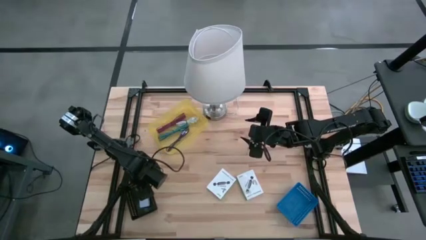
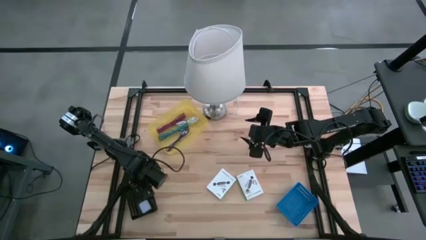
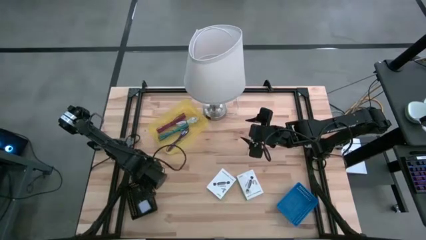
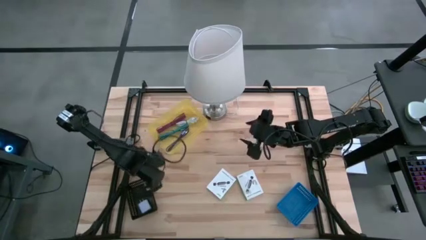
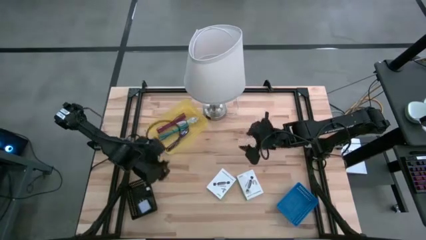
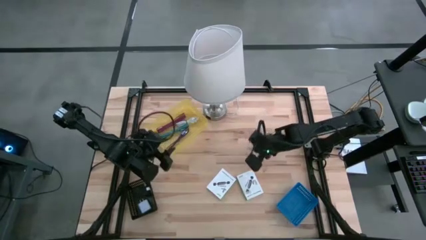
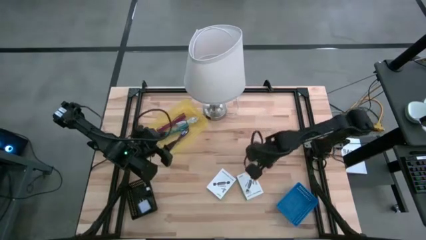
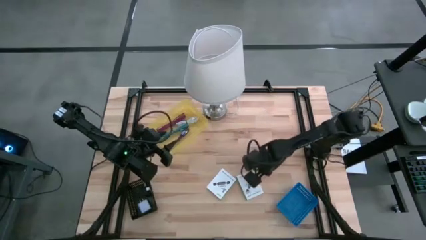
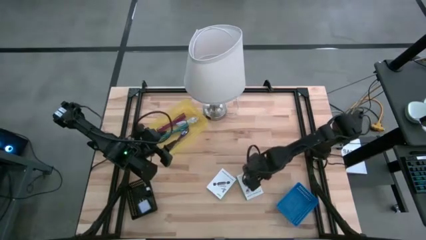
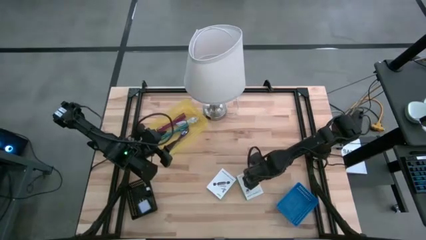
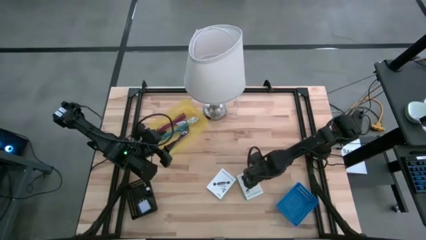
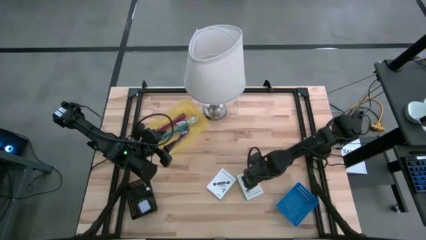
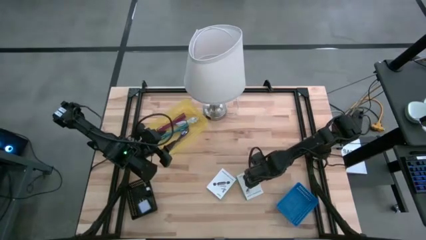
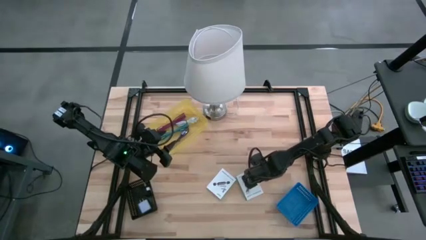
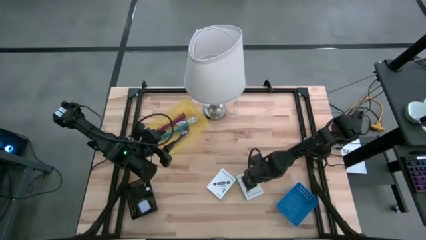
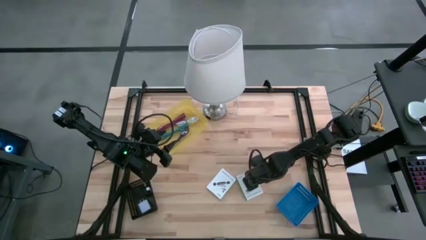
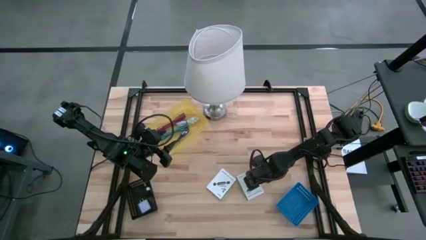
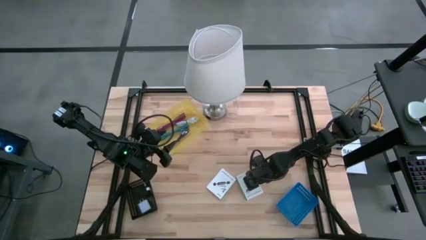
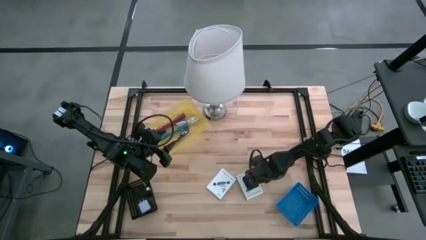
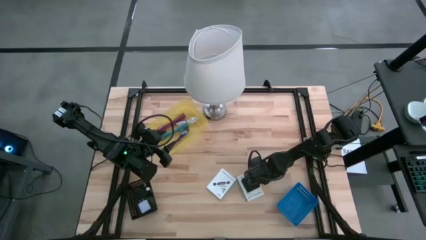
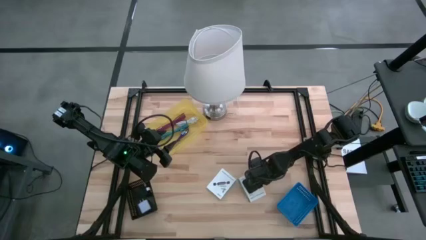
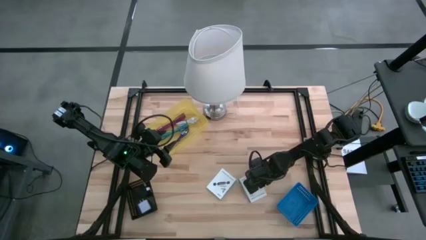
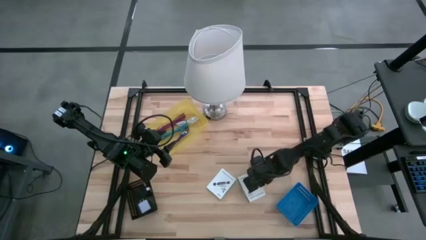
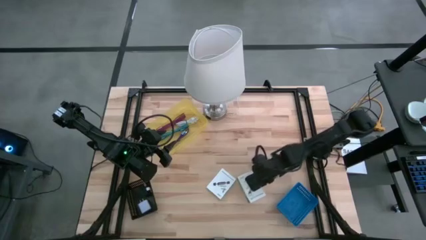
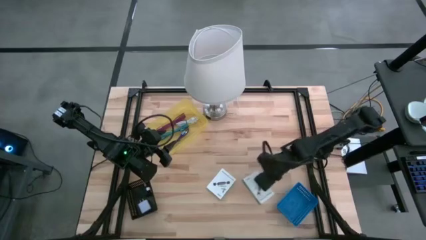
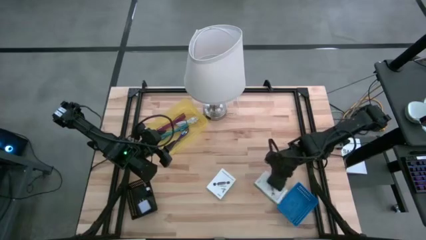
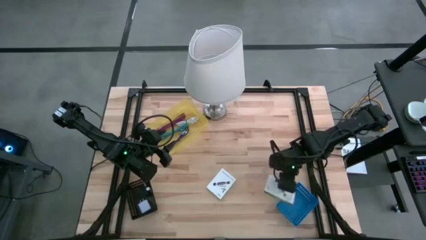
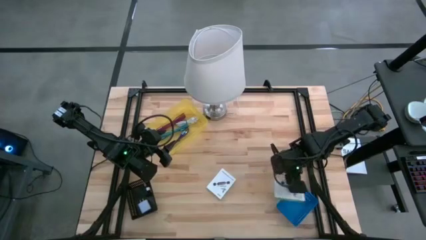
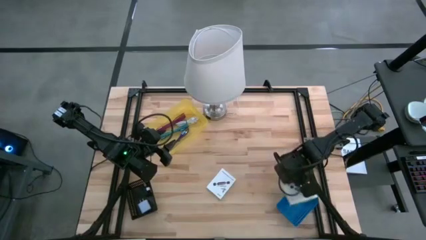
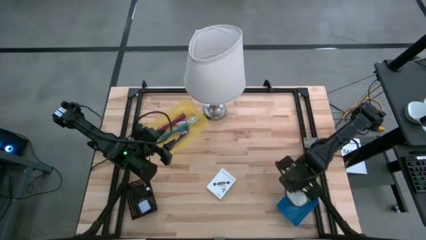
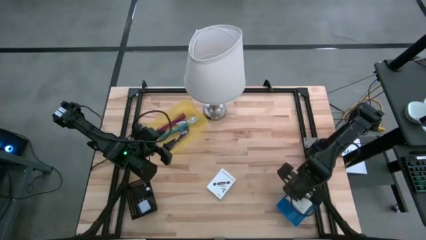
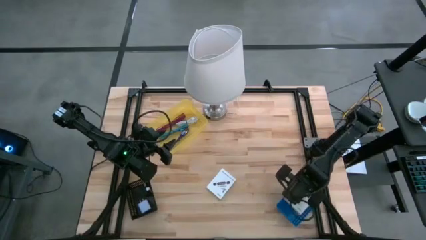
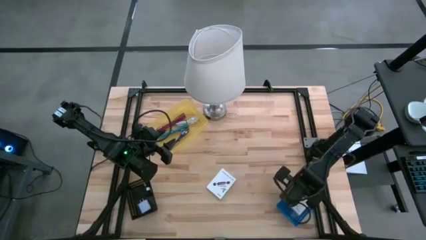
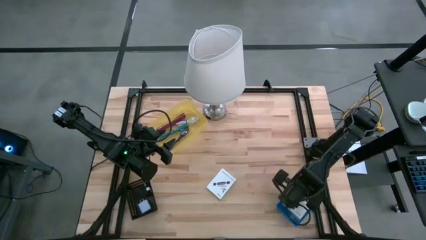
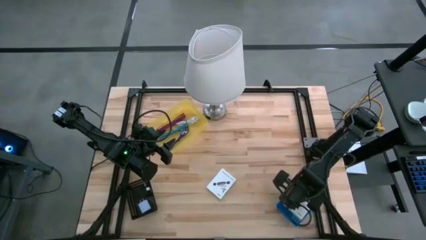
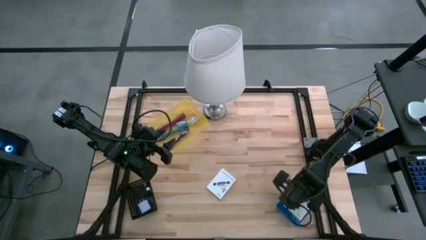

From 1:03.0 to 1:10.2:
Task: Pick and place items into bin
Put the white card reader box into the blue bin

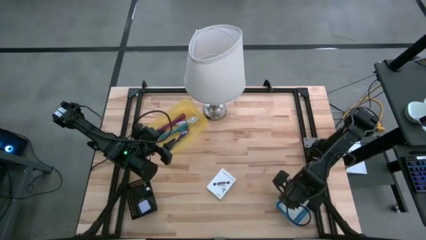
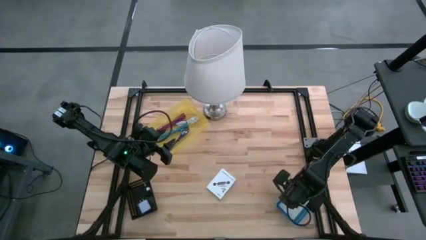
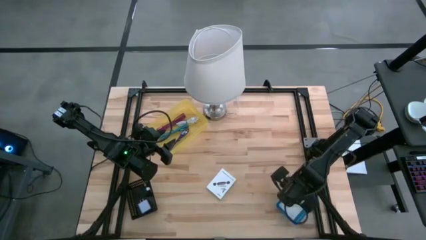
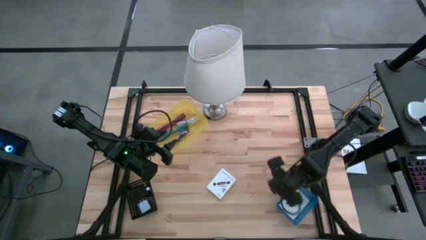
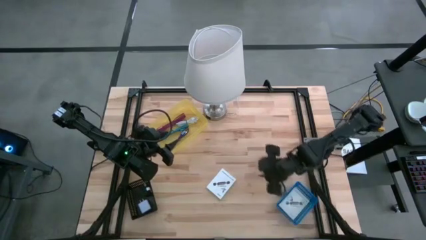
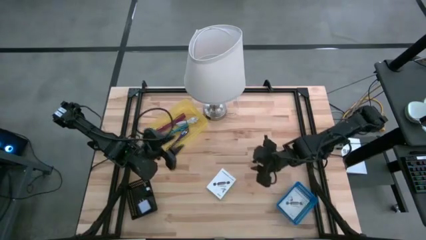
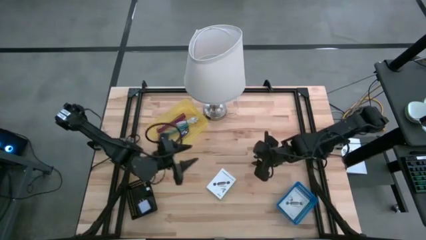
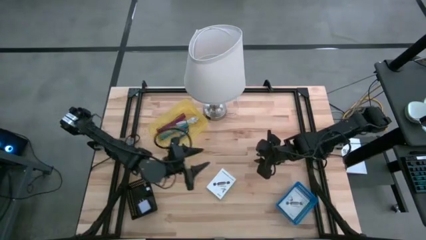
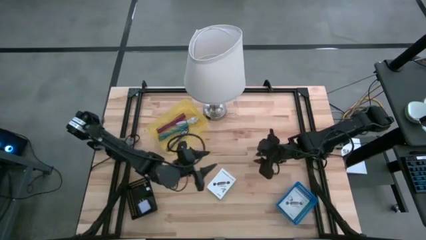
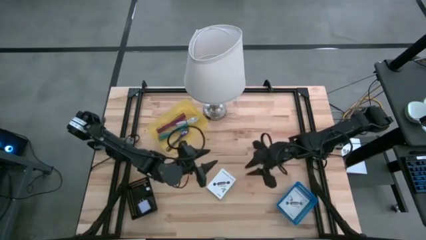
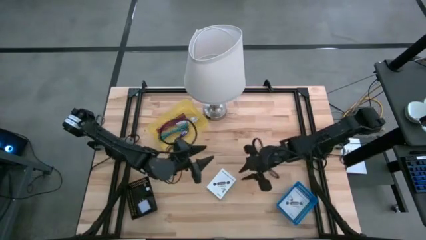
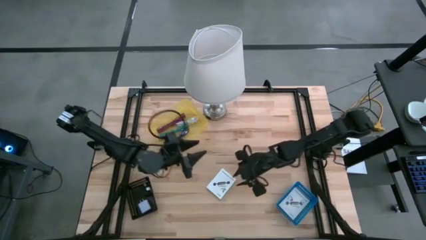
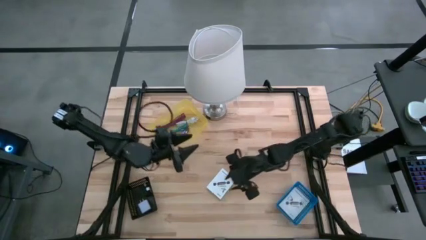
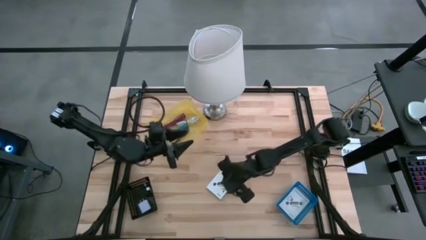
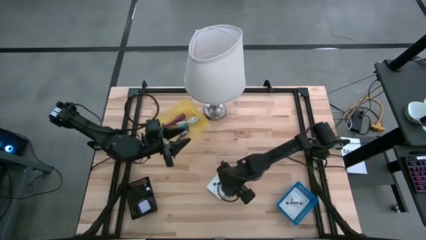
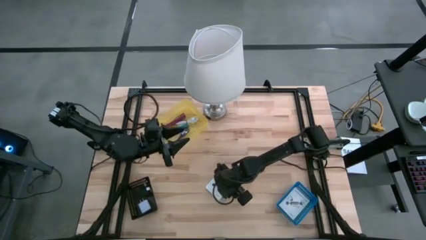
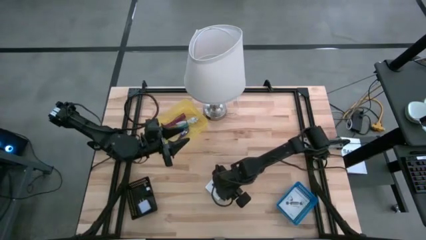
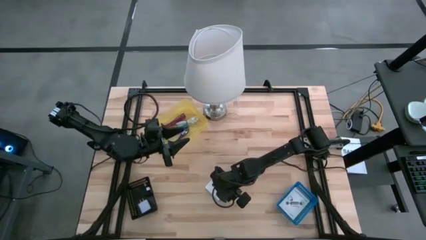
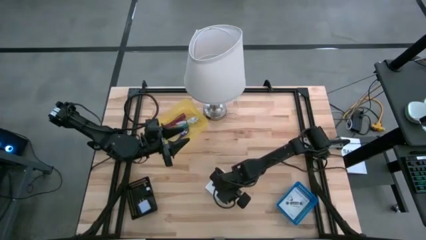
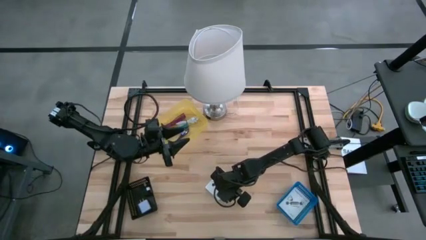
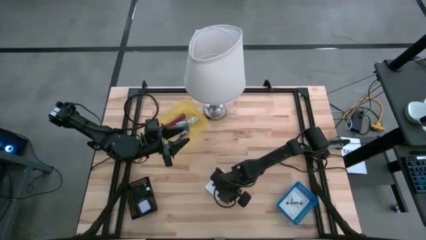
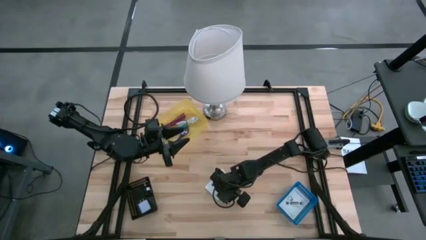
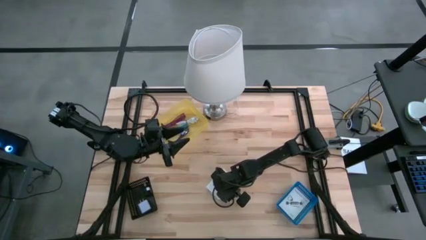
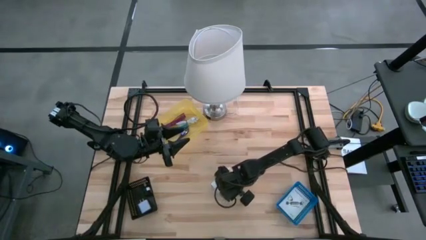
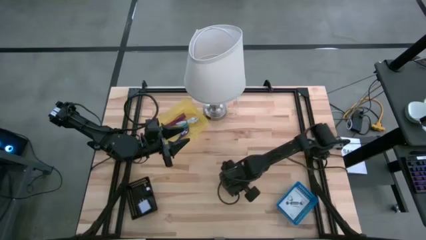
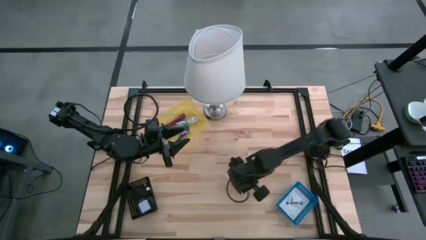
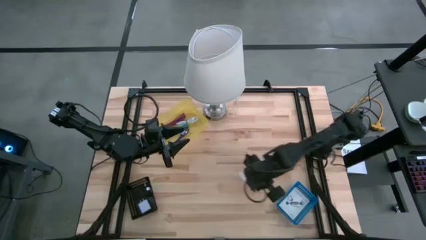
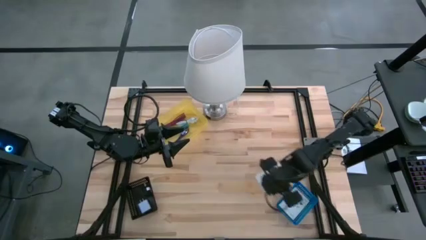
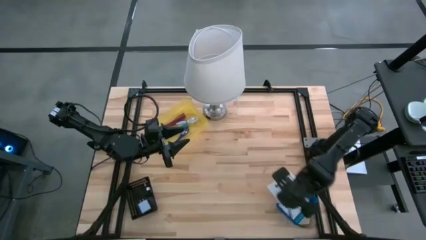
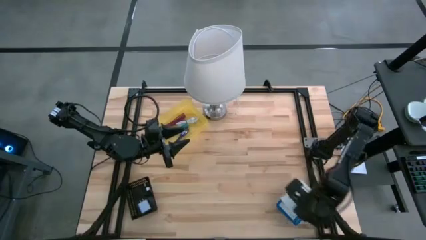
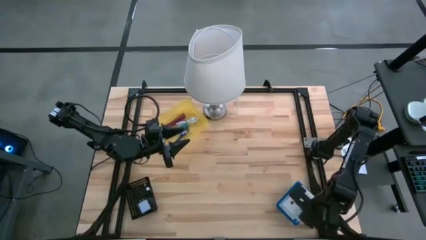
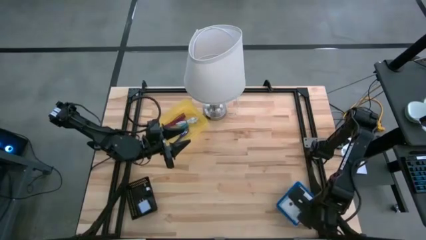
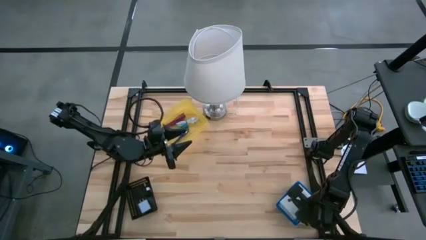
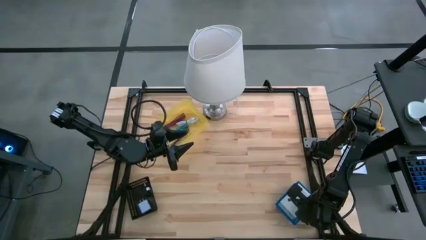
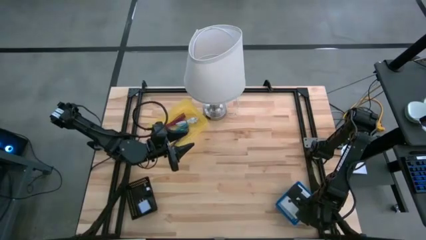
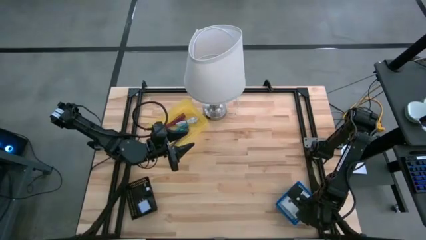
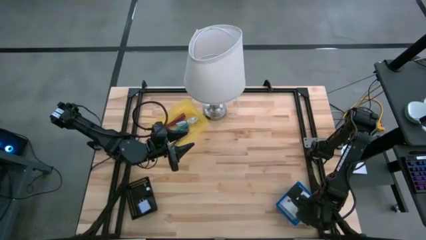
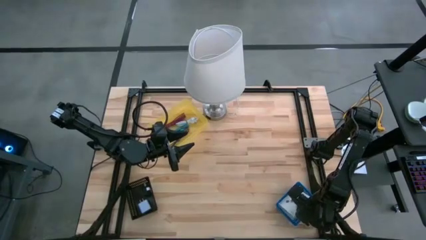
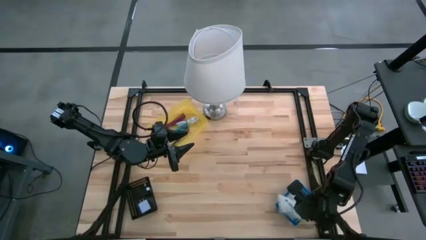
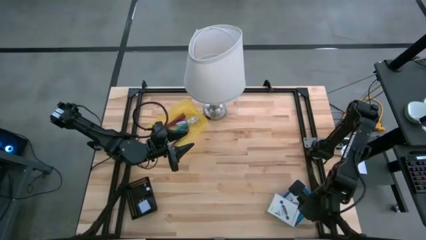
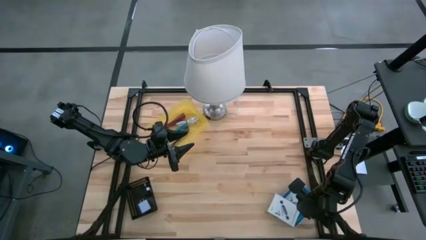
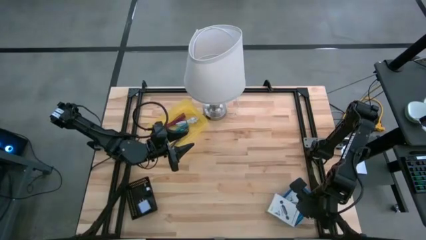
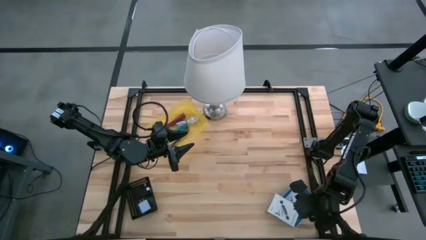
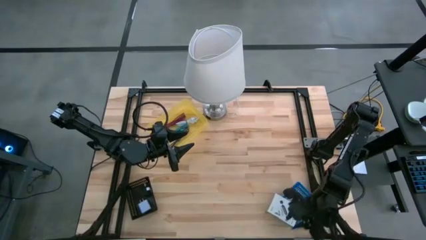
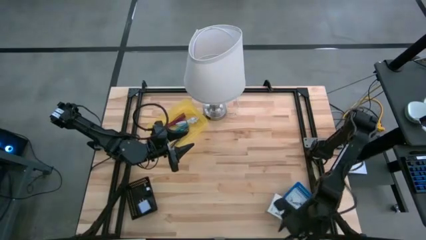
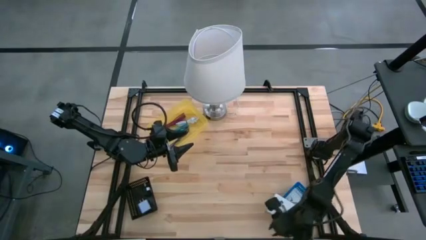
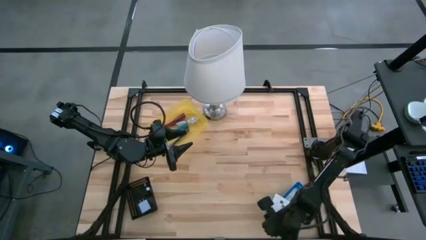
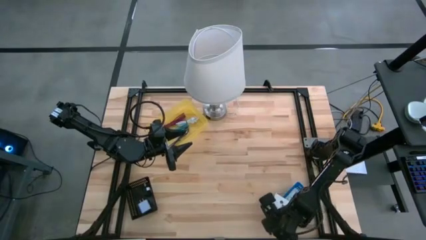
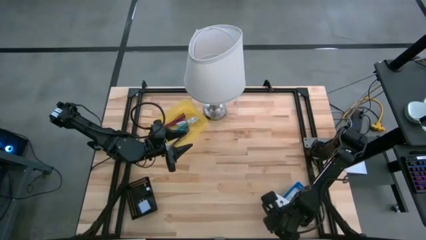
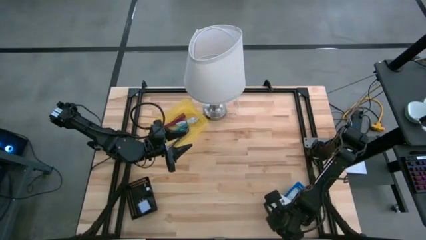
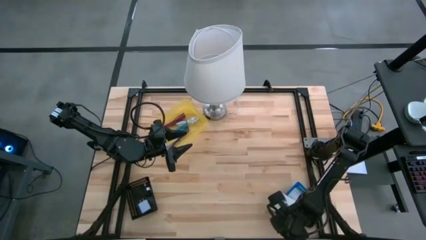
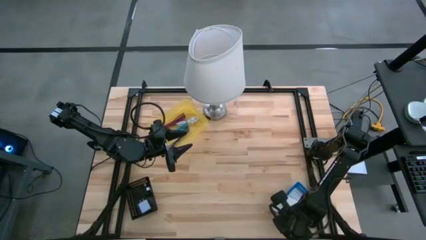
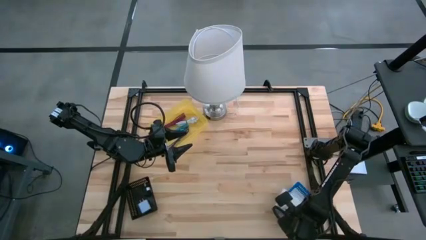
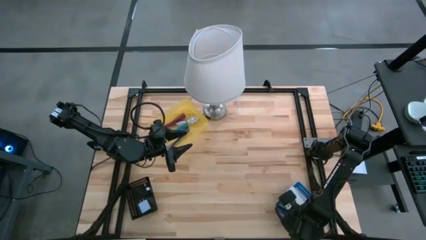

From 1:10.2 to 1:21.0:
Put the white card reader box into the blue bin
